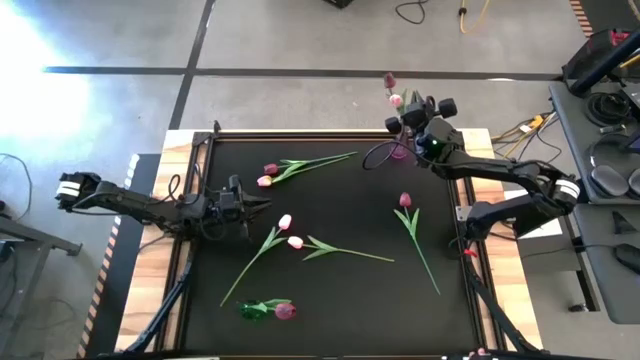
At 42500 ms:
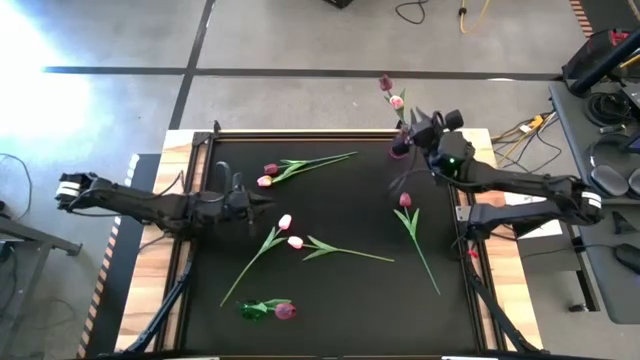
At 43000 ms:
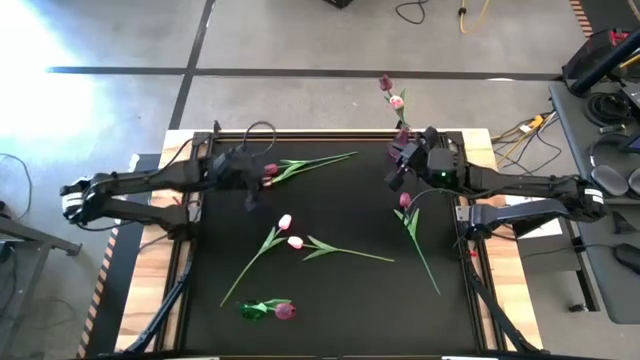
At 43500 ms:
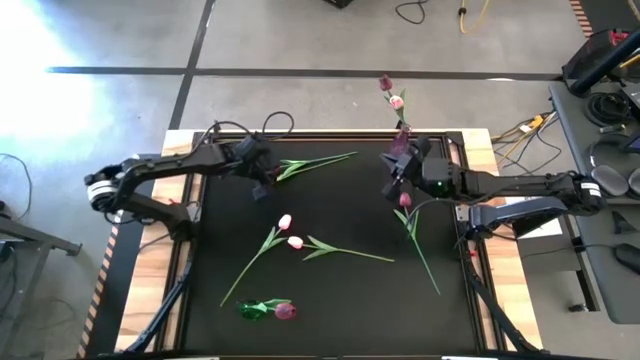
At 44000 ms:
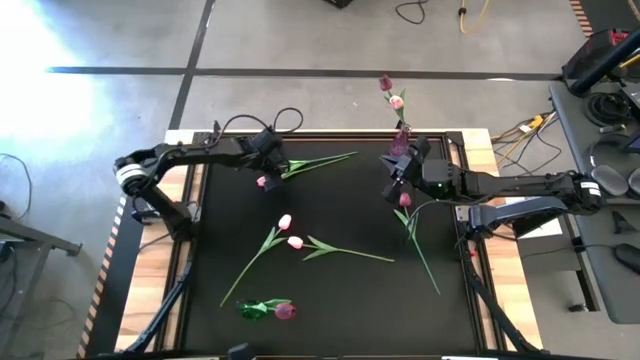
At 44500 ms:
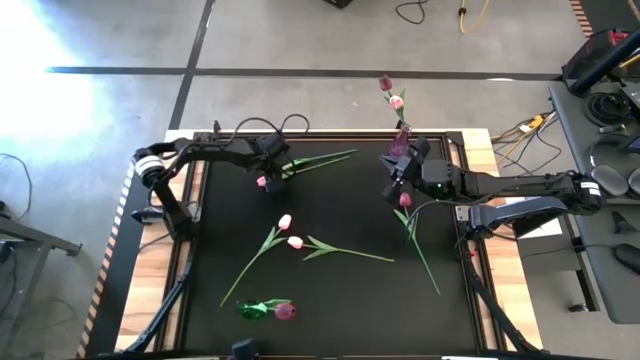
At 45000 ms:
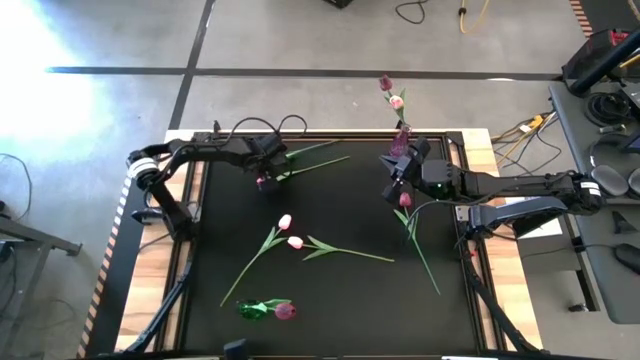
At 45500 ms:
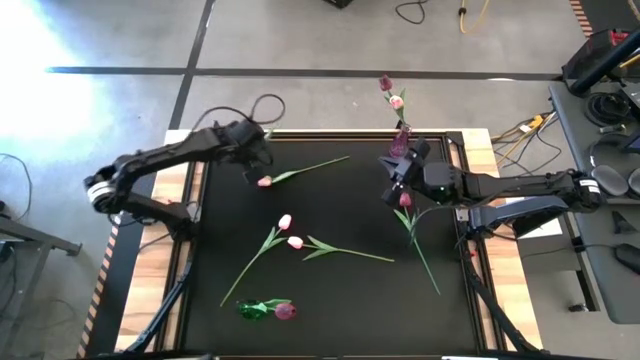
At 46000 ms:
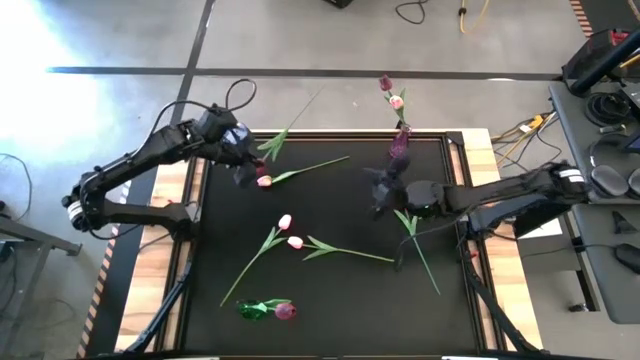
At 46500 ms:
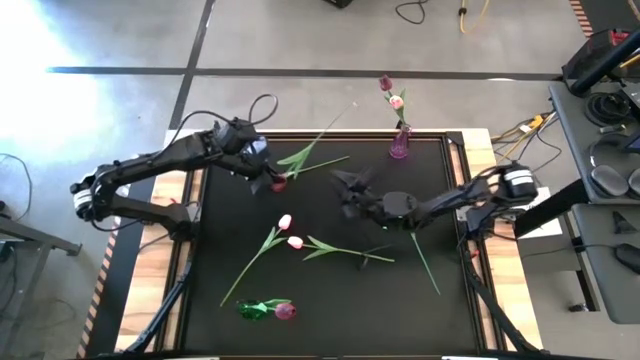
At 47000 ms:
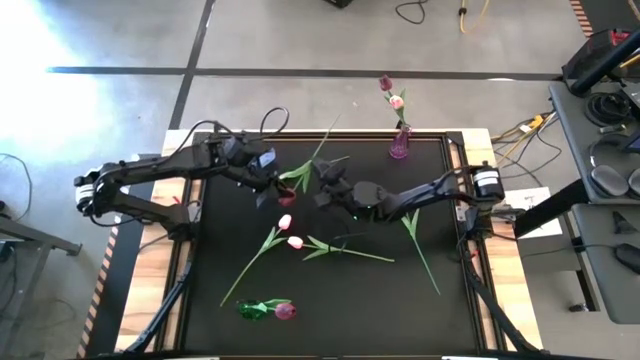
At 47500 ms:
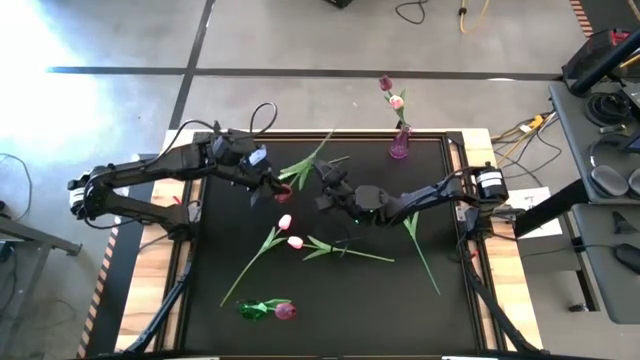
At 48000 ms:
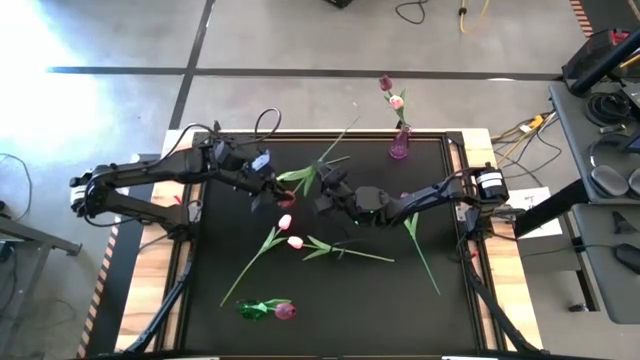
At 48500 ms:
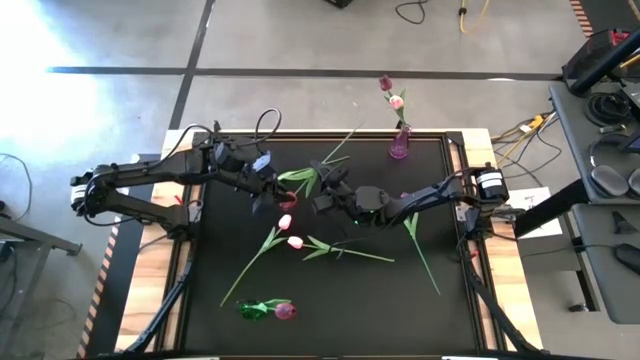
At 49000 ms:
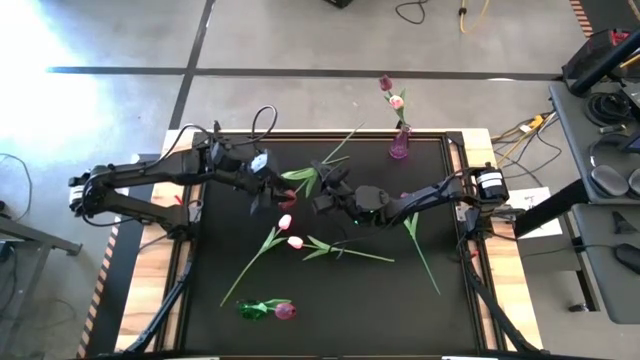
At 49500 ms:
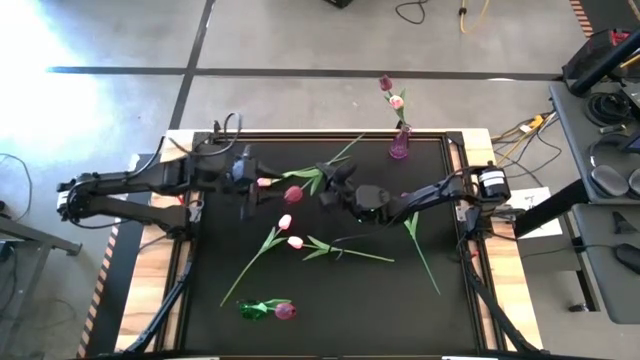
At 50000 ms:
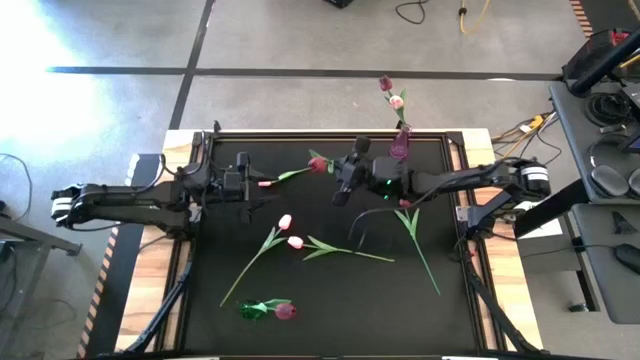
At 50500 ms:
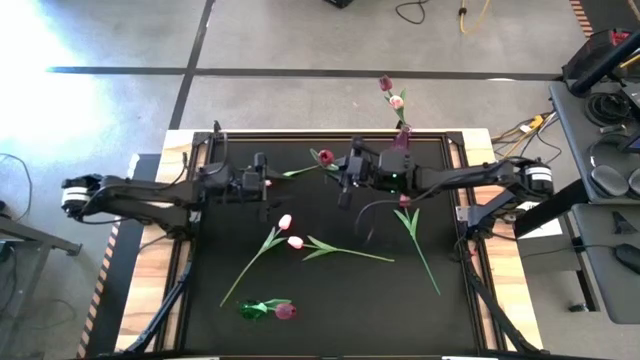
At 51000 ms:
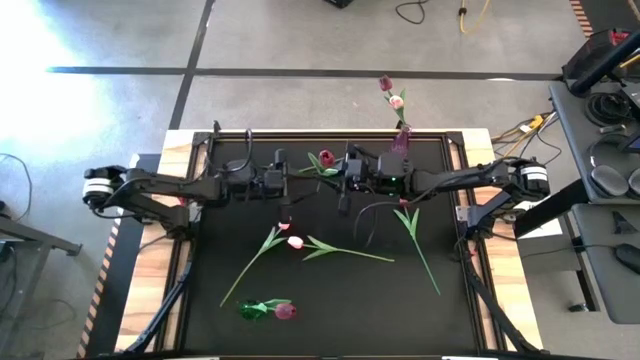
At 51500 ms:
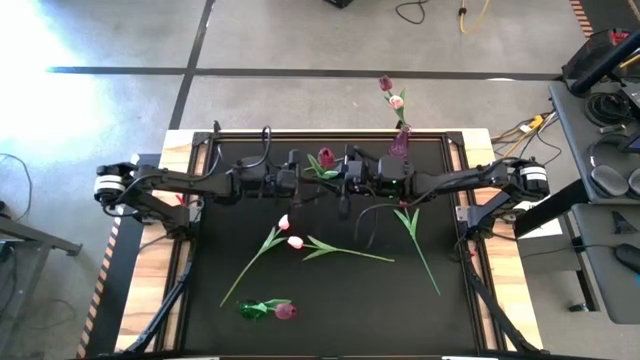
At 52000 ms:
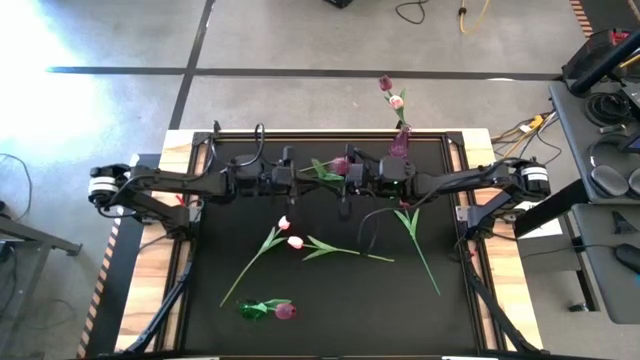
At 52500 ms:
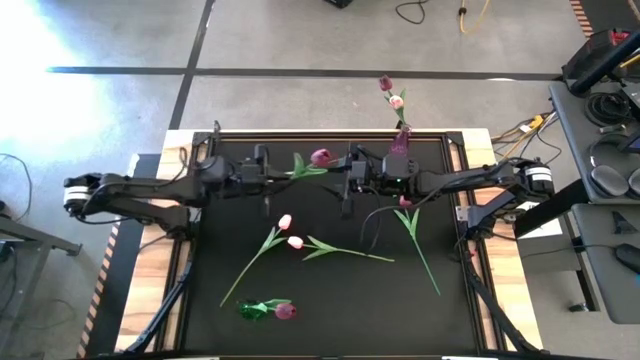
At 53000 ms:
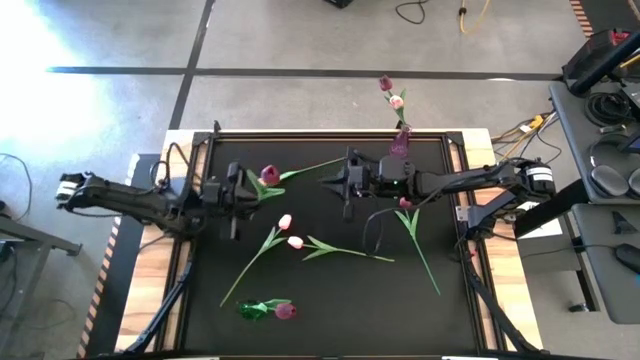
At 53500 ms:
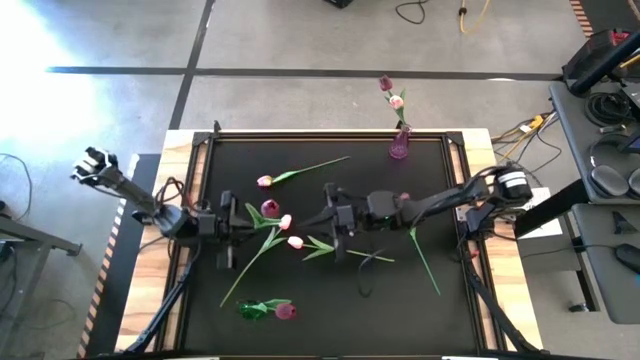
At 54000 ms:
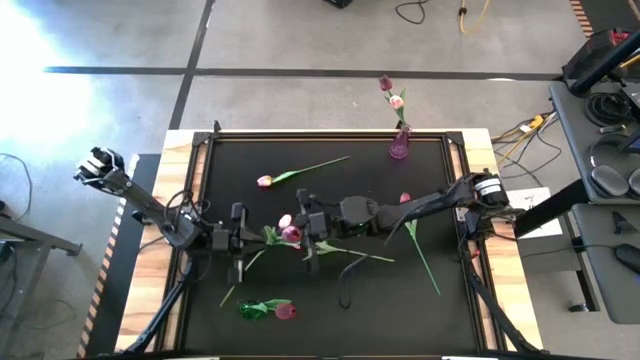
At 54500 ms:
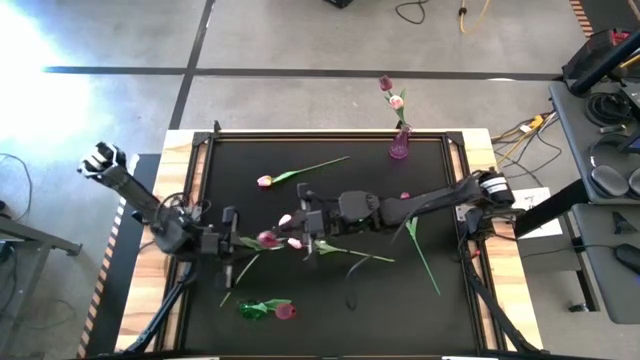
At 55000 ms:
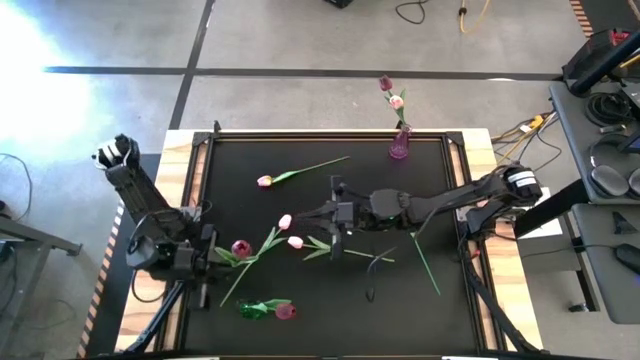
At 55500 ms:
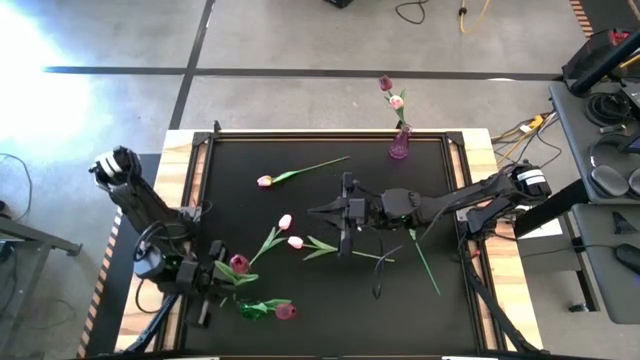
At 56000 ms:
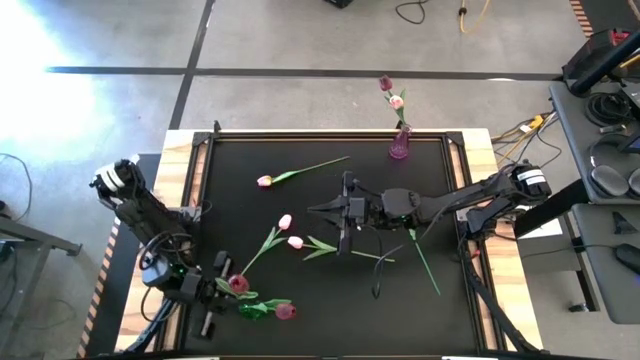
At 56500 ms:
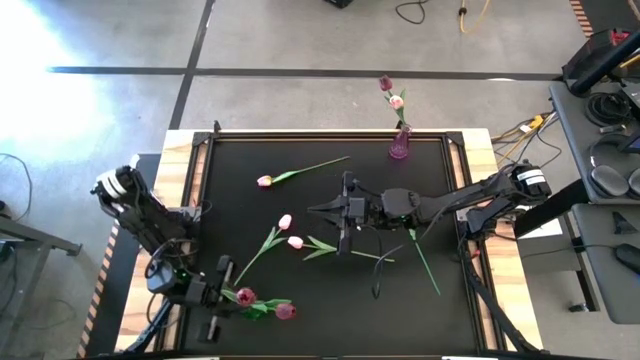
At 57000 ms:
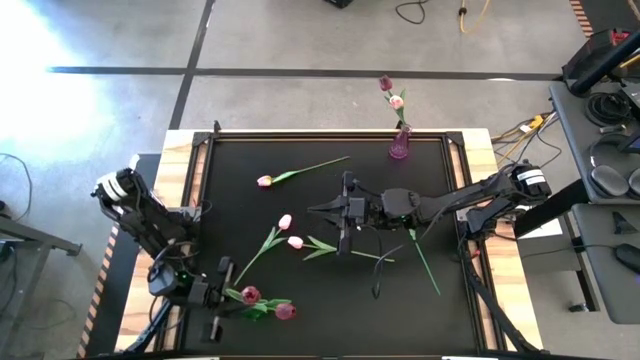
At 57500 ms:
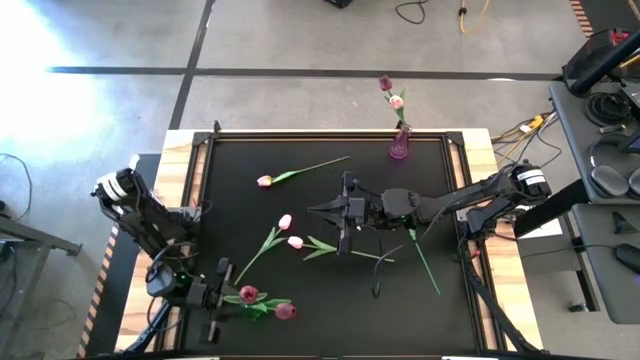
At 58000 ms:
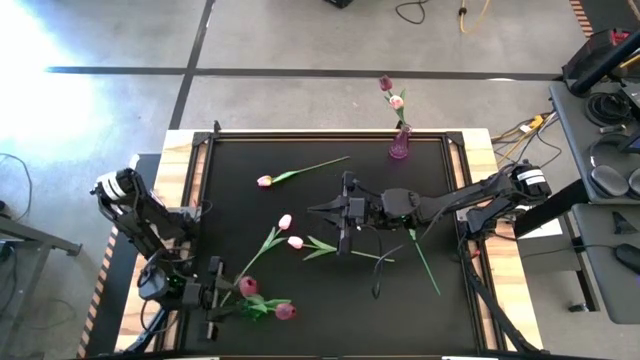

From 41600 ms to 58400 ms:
Task: Sort flowers into vase by color
Put the red flower into the green vase

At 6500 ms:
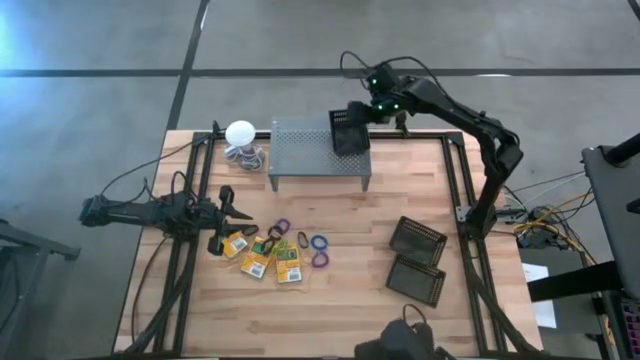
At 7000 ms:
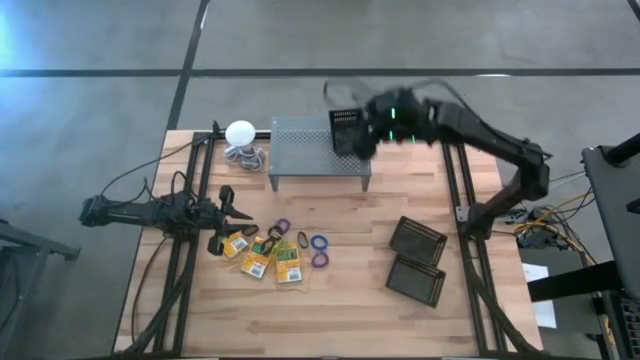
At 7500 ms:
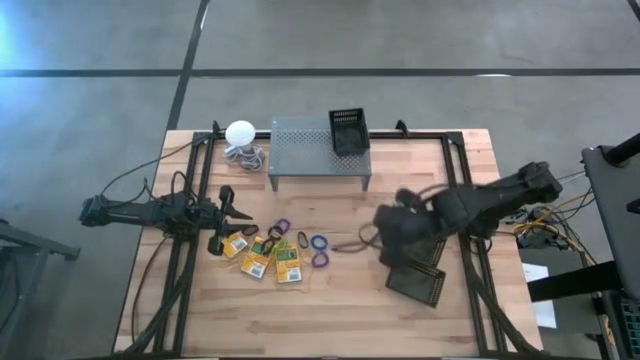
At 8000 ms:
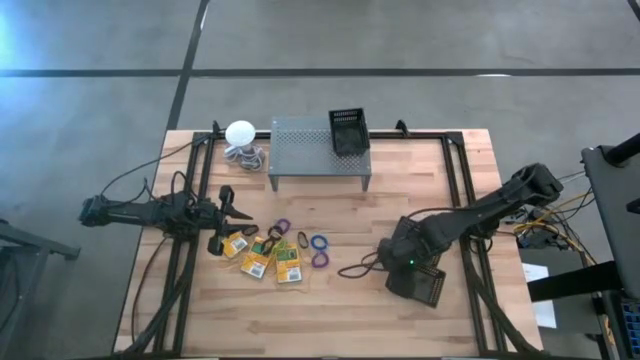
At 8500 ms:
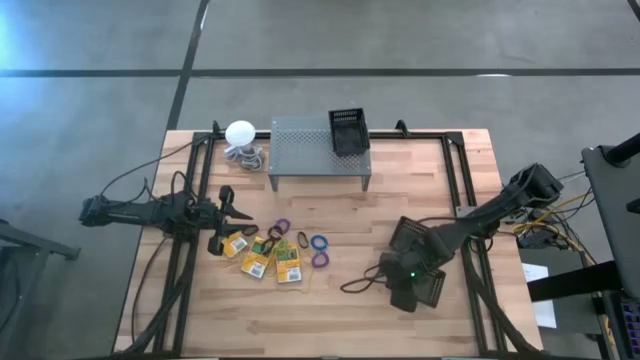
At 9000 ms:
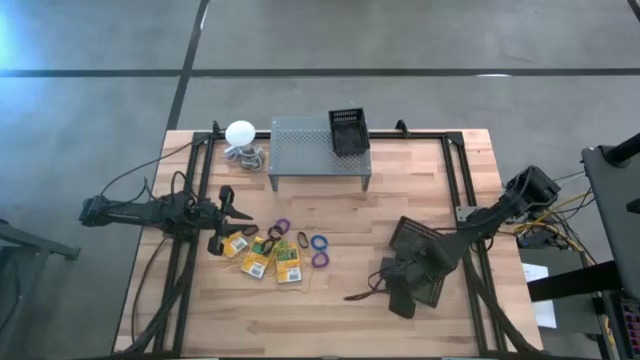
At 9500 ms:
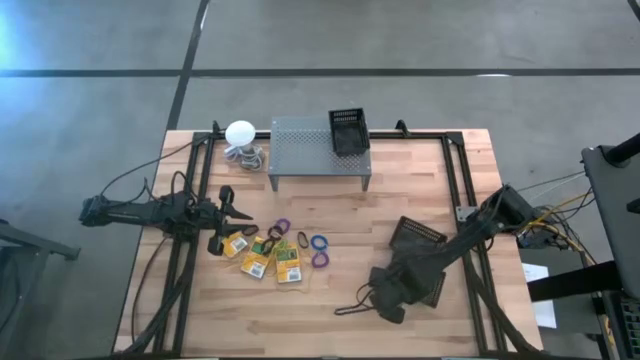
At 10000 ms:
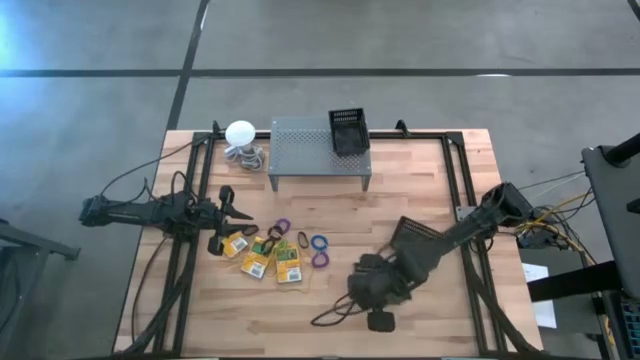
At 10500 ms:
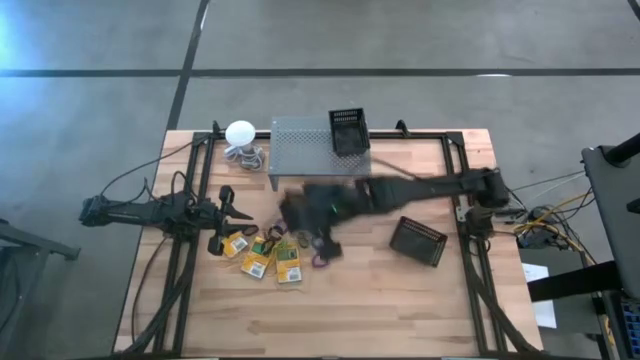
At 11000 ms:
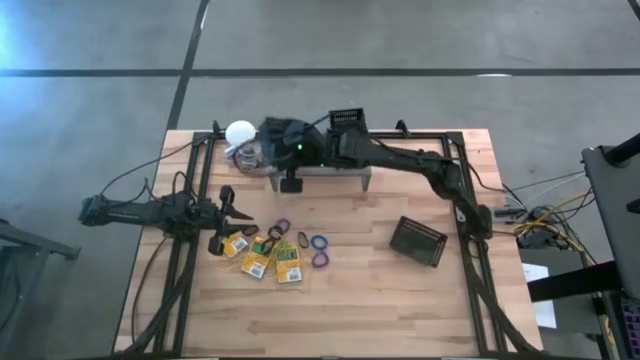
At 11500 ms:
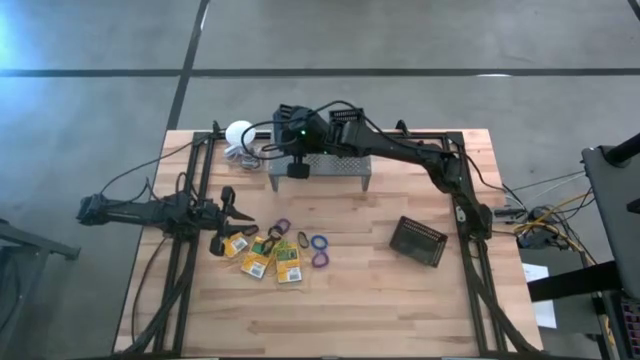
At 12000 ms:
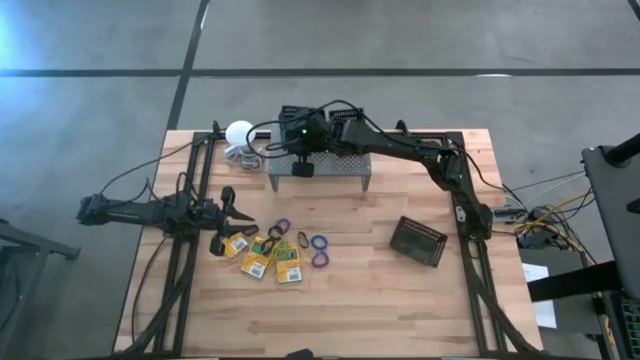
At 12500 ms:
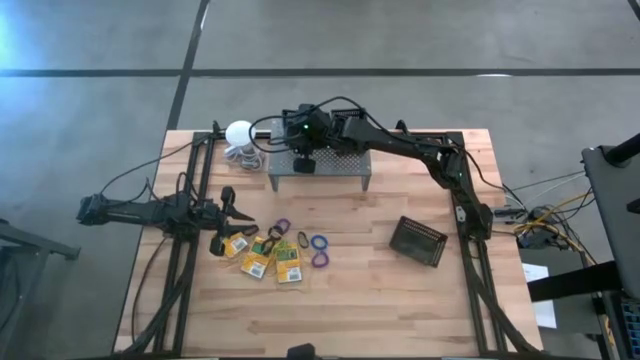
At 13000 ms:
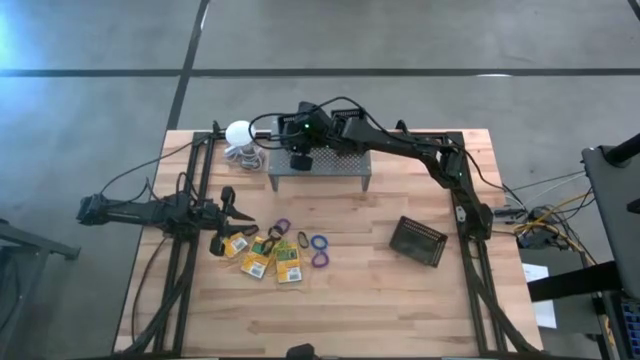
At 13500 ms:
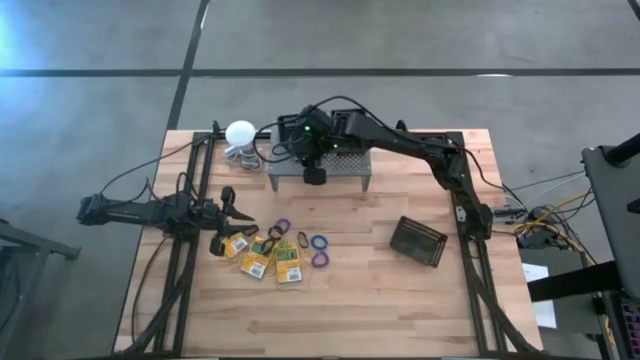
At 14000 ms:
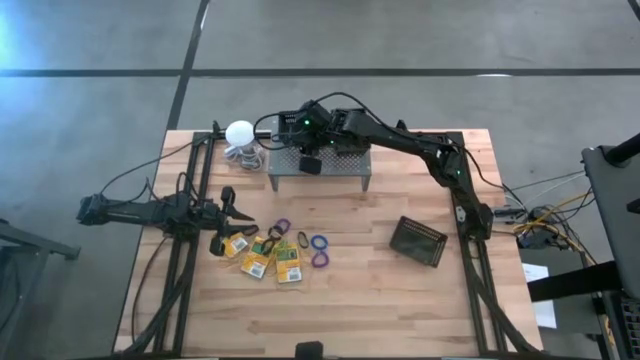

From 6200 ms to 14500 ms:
Task: Pick & Place Office Desk Supplies
Put the bottom black bin on the shelf
